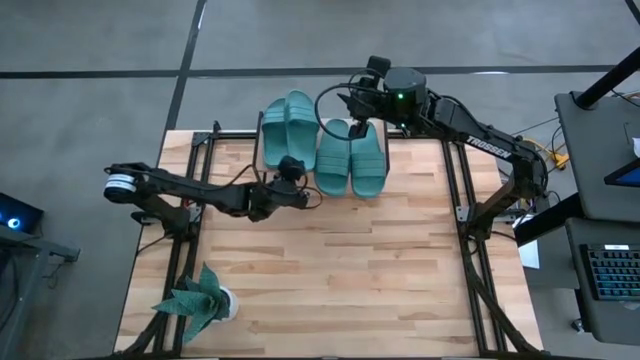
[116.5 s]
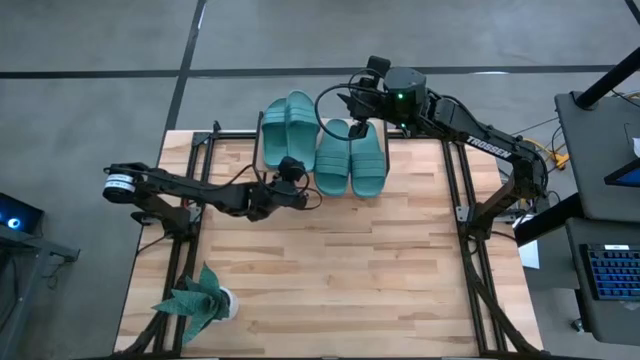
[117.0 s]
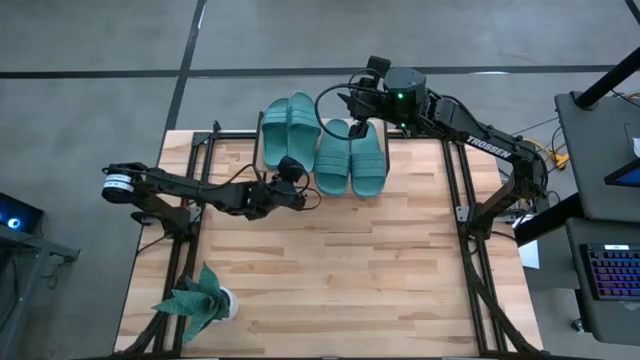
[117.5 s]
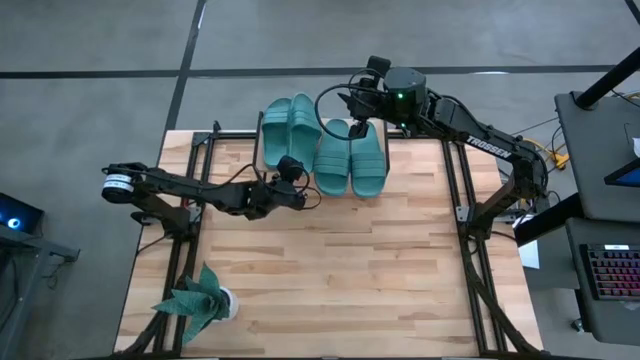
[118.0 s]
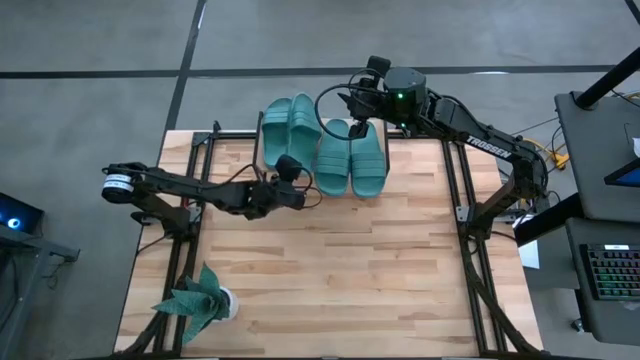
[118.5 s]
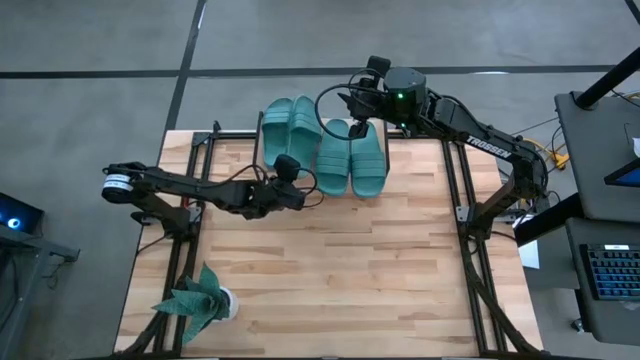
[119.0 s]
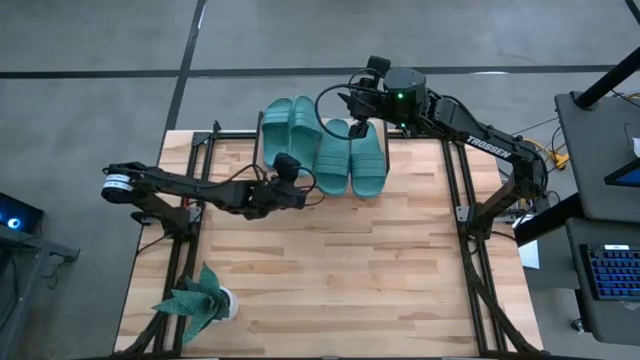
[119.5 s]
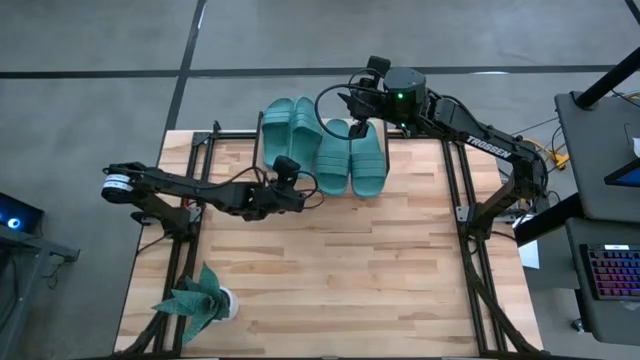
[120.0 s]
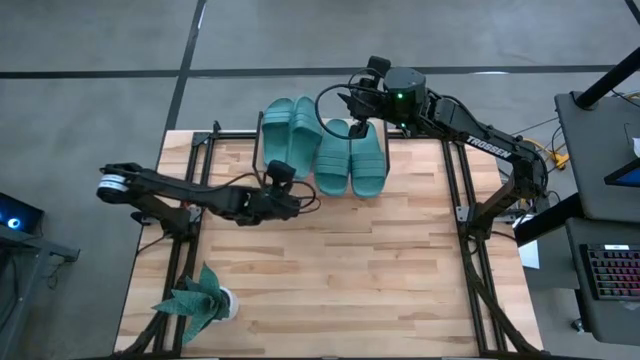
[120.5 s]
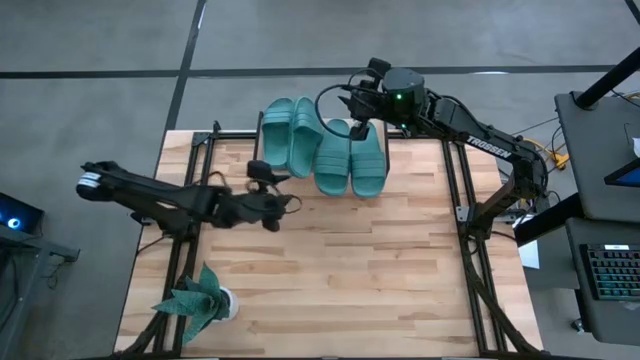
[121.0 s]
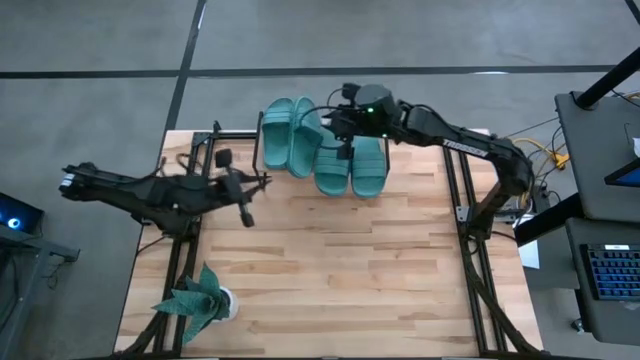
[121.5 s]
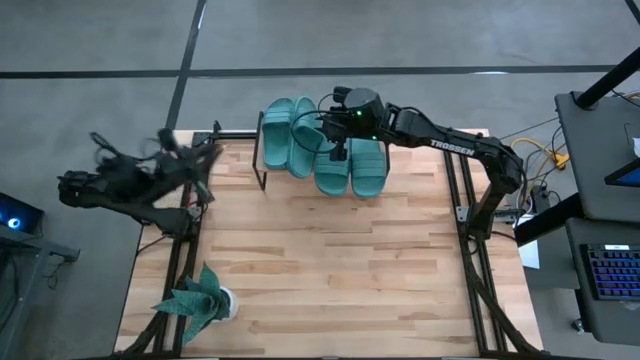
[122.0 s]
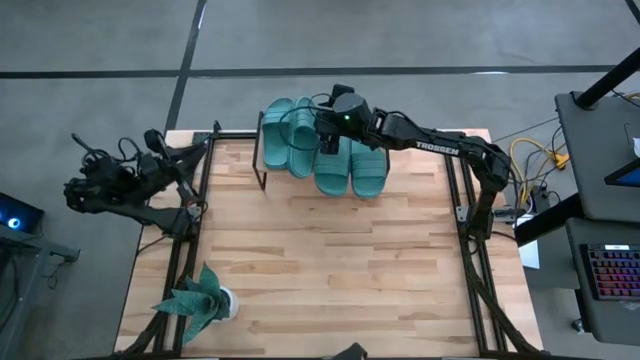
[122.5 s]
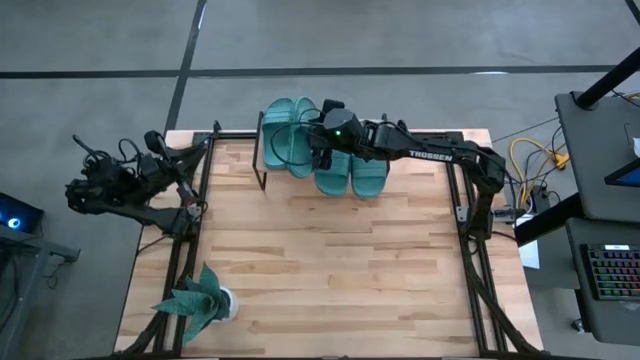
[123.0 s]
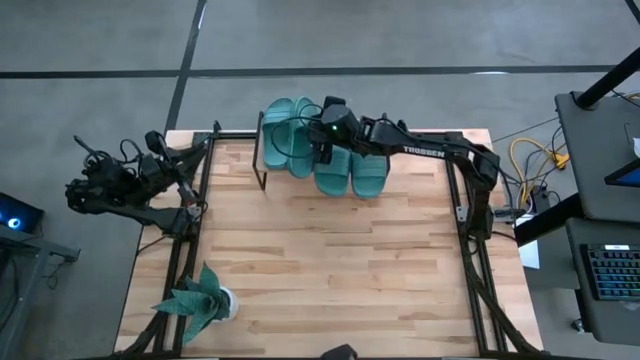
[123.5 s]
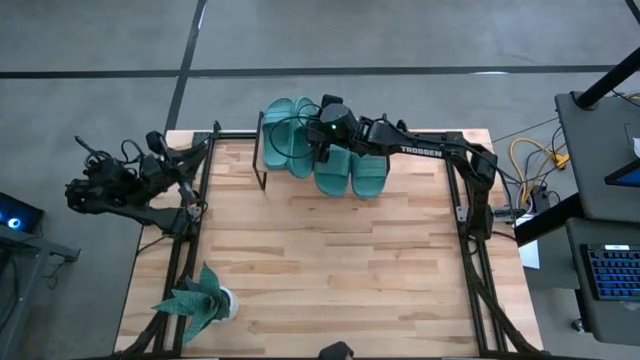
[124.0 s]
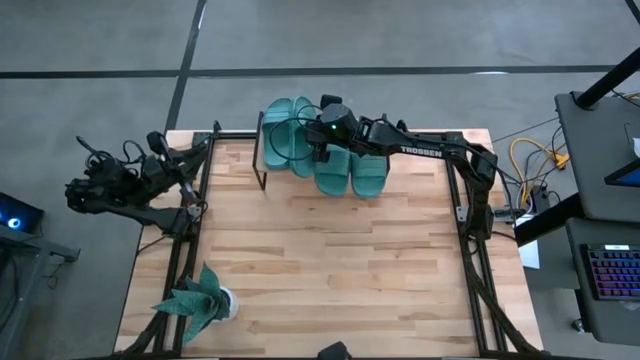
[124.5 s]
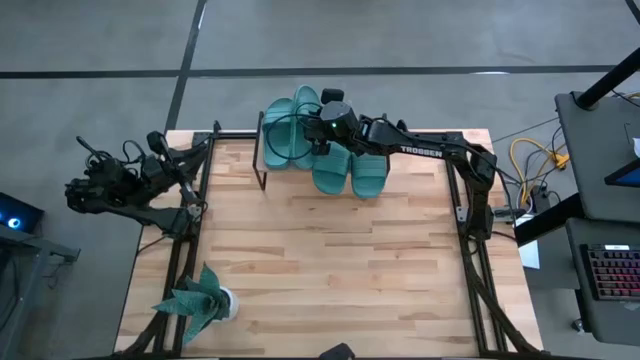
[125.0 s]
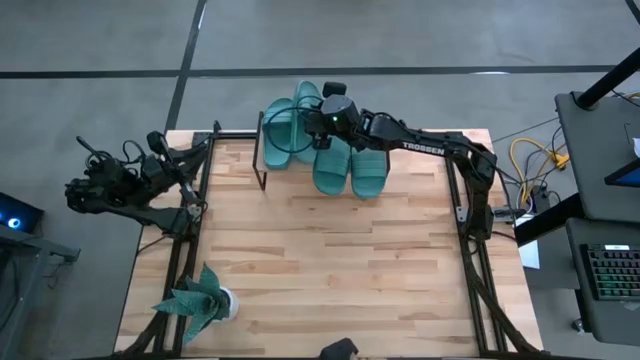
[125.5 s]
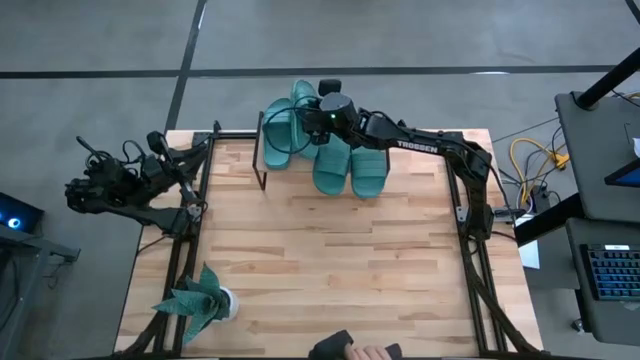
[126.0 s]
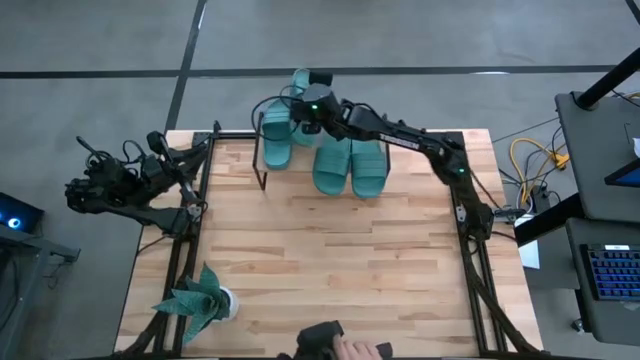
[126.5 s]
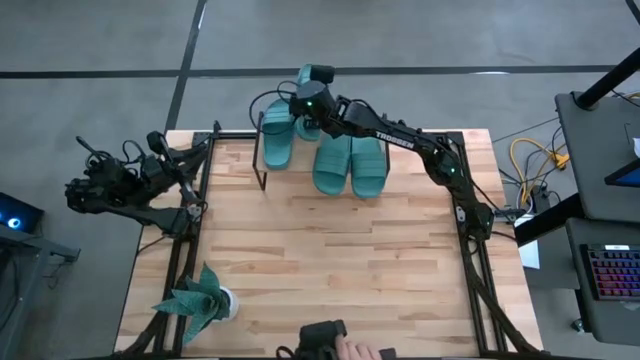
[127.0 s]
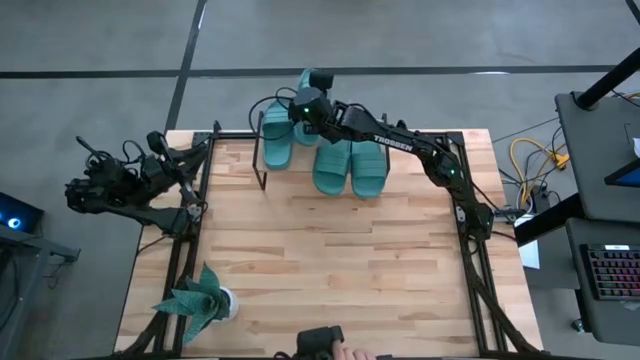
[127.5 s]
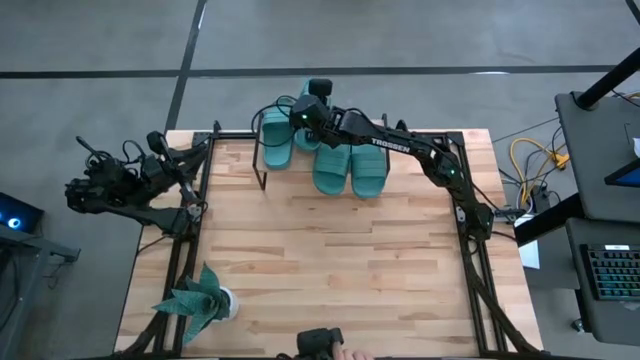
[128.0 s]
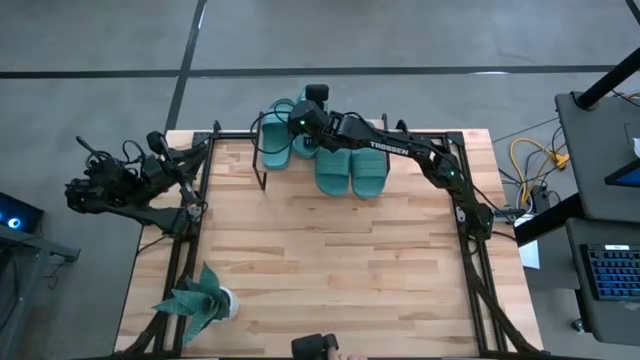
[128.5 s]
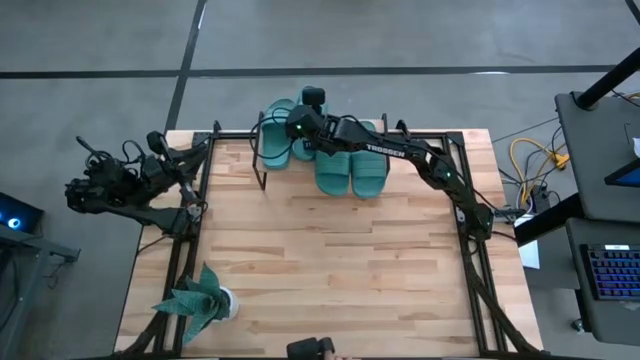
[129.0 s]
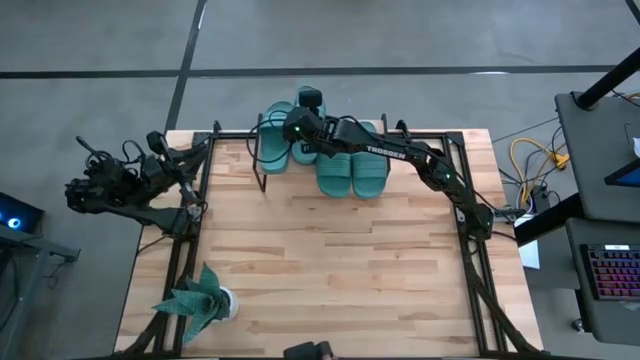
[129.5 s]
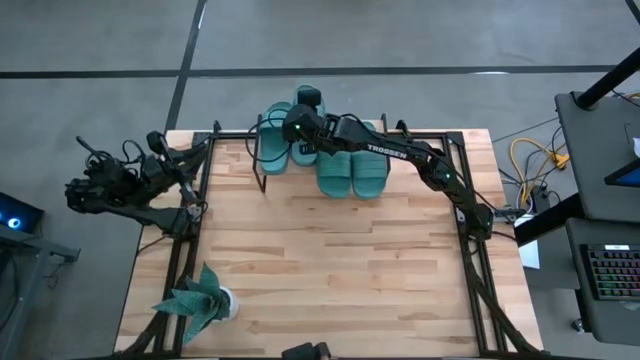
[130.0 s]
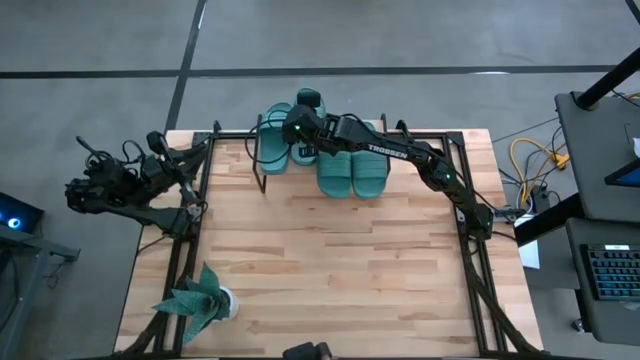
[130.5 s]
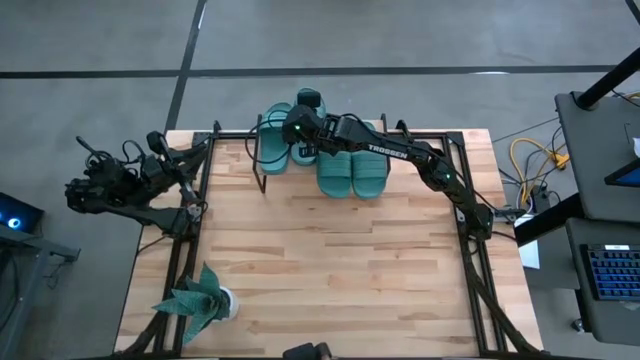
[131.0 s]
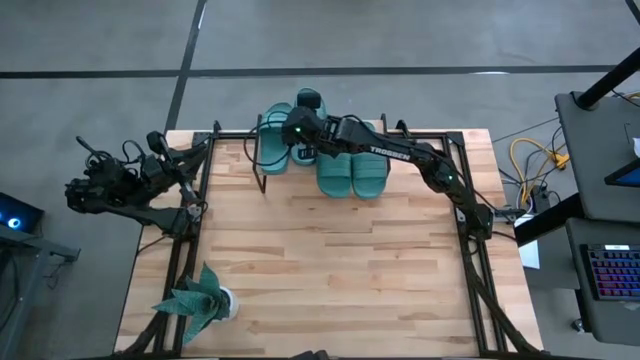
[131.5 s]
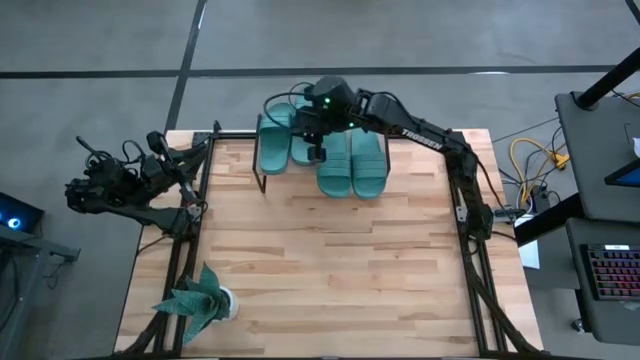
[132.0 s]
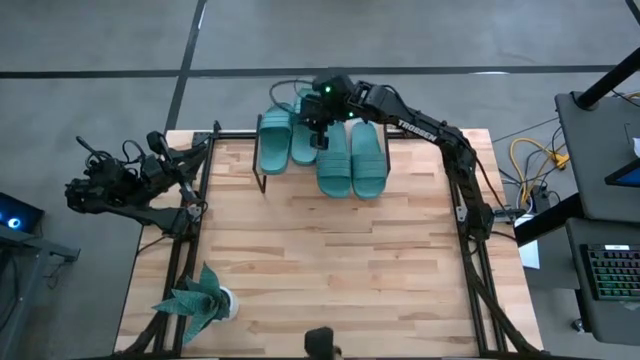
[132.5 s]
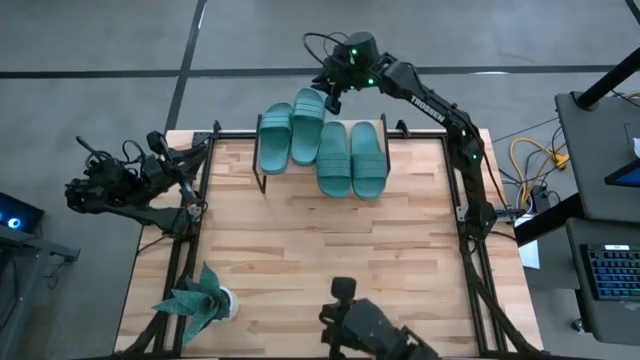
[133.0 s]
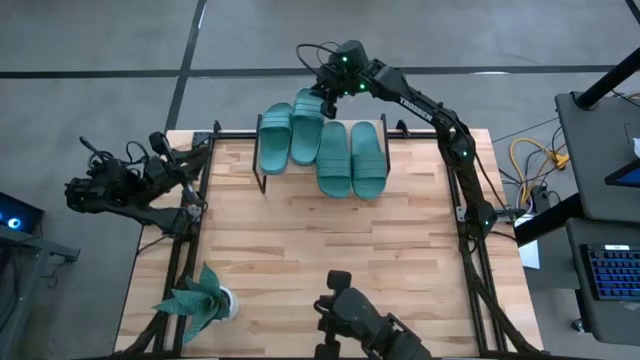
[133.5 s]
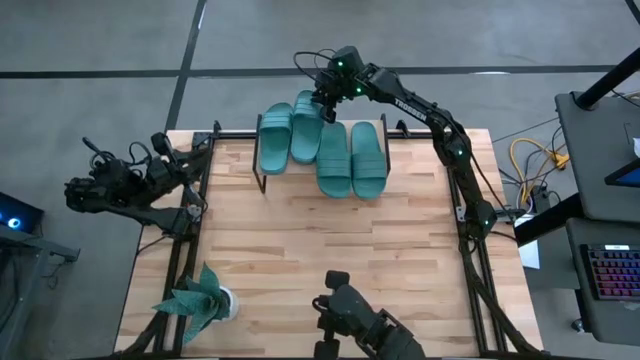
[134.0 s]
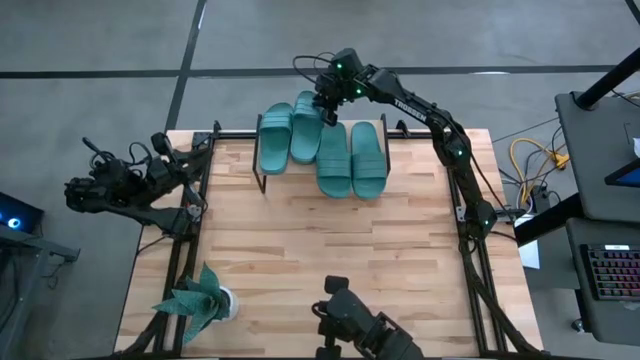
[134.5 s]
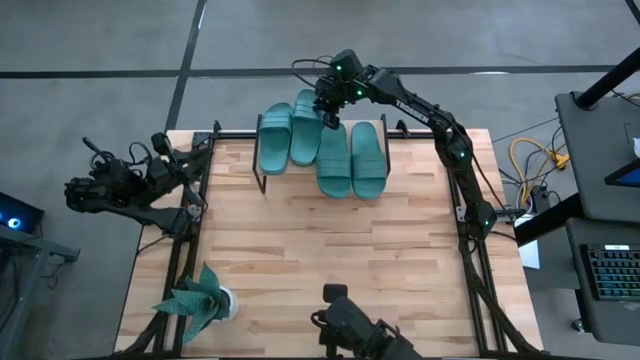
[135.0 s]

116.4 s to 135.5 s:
Task: Pick and place slides into the shelf
Put the green slide on the shelf
